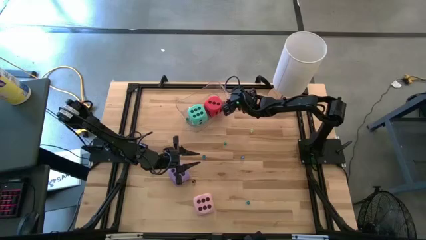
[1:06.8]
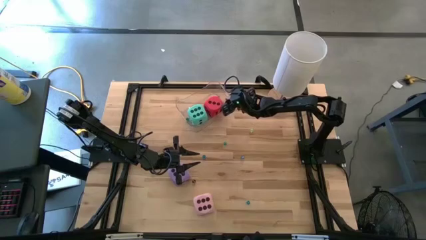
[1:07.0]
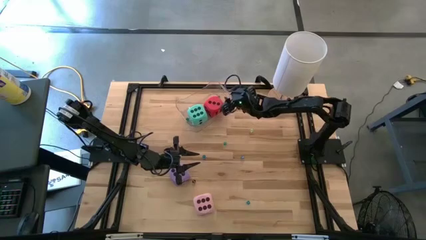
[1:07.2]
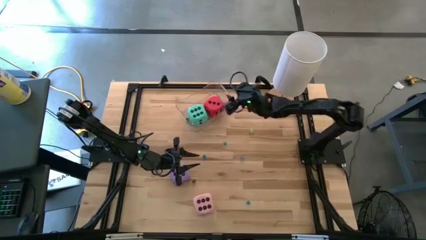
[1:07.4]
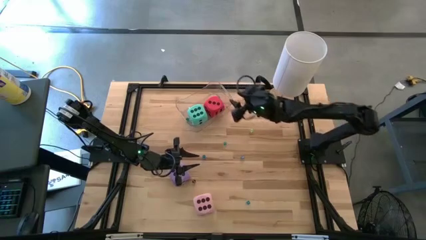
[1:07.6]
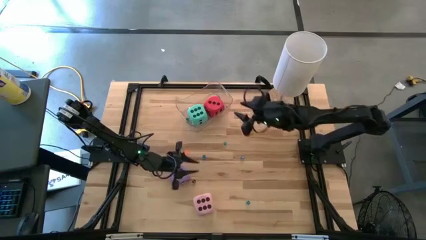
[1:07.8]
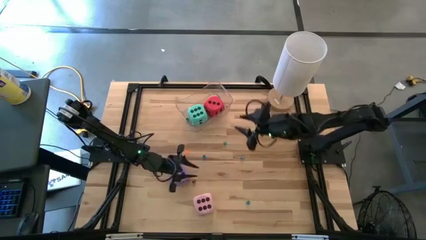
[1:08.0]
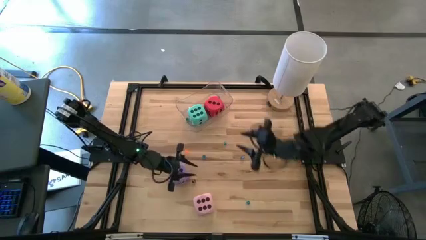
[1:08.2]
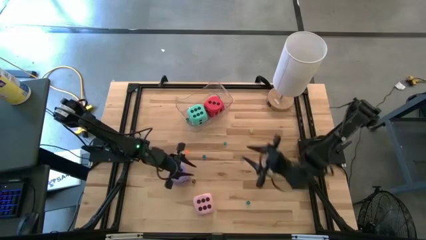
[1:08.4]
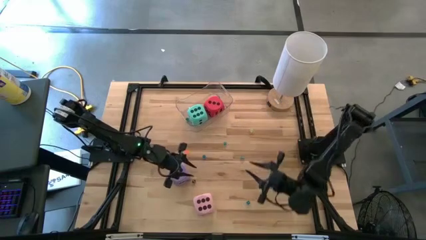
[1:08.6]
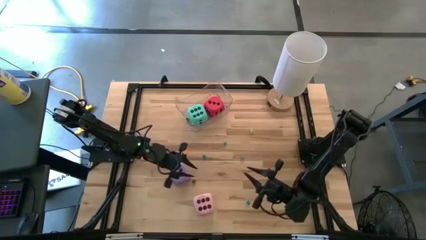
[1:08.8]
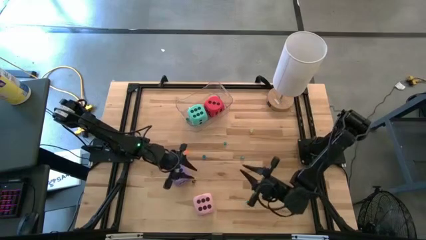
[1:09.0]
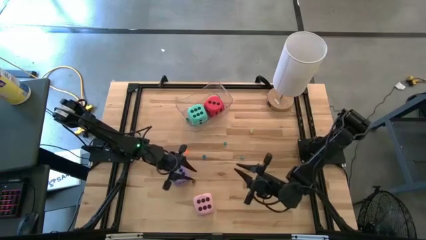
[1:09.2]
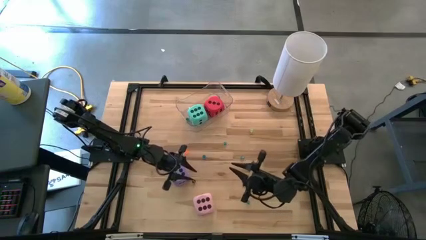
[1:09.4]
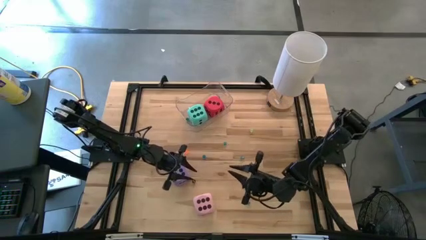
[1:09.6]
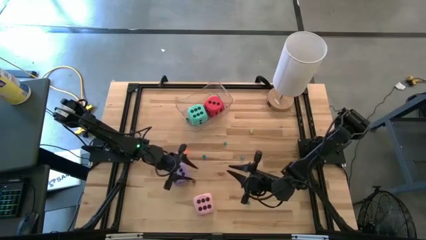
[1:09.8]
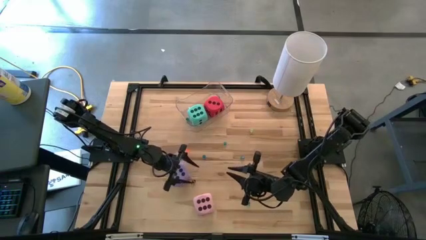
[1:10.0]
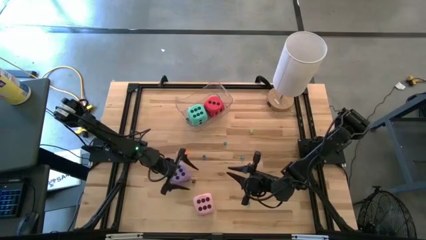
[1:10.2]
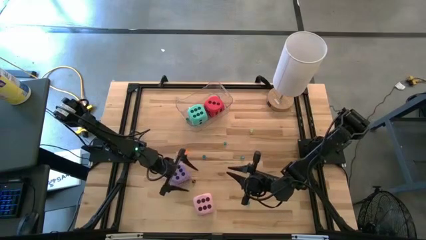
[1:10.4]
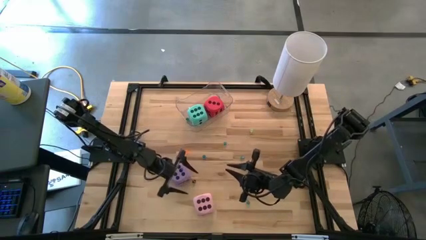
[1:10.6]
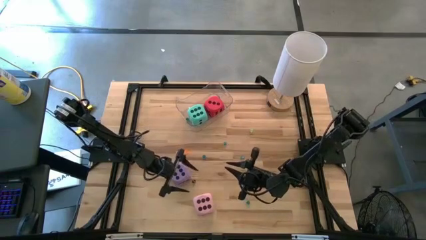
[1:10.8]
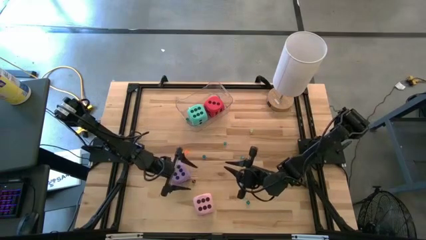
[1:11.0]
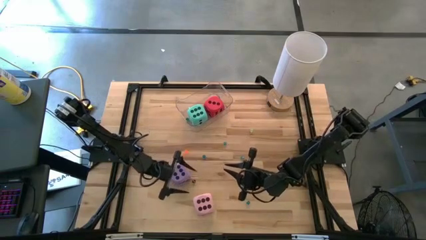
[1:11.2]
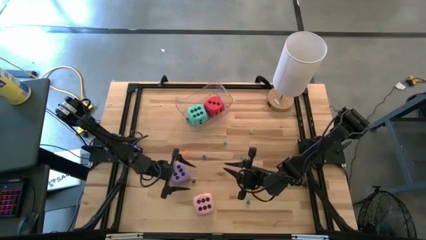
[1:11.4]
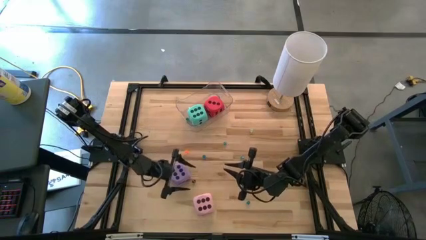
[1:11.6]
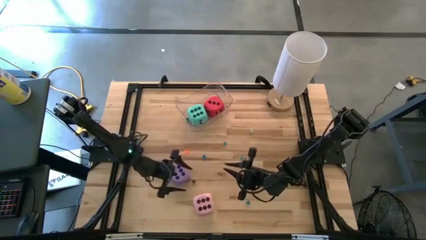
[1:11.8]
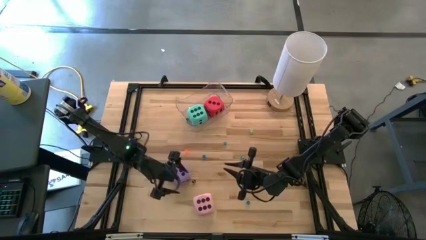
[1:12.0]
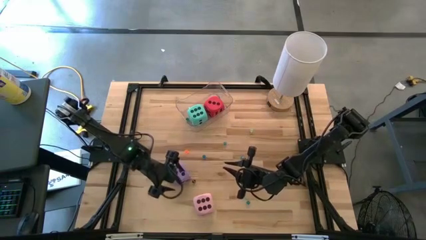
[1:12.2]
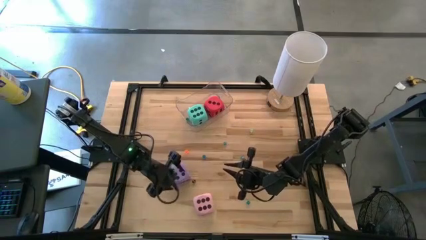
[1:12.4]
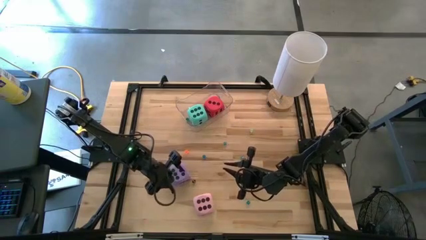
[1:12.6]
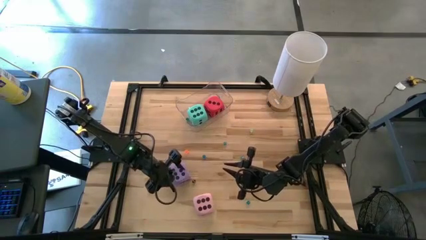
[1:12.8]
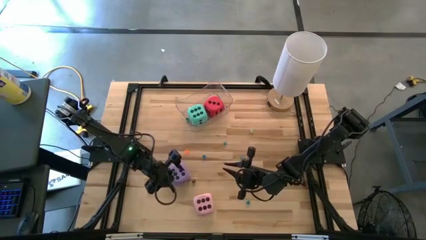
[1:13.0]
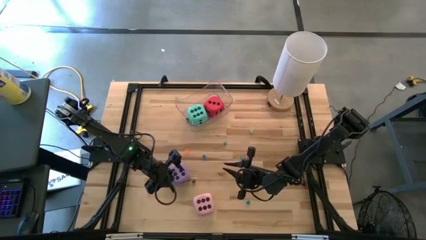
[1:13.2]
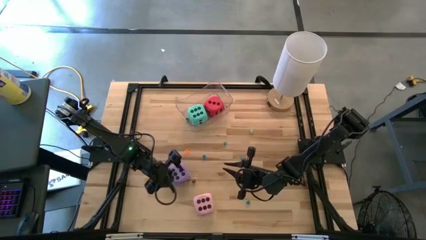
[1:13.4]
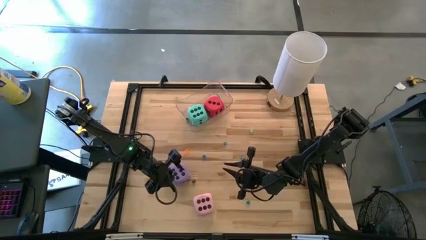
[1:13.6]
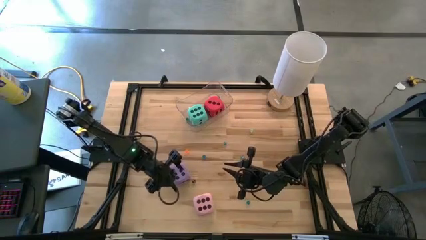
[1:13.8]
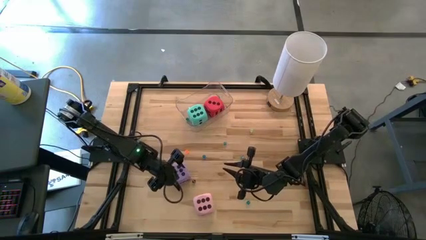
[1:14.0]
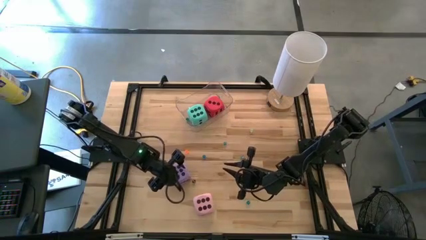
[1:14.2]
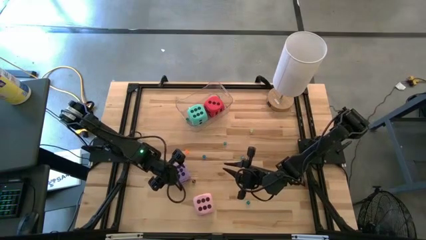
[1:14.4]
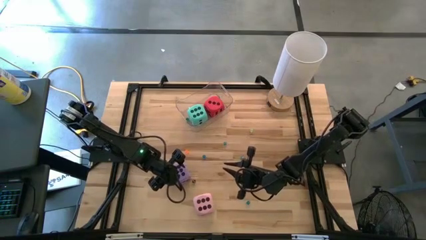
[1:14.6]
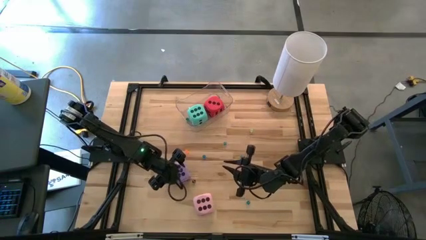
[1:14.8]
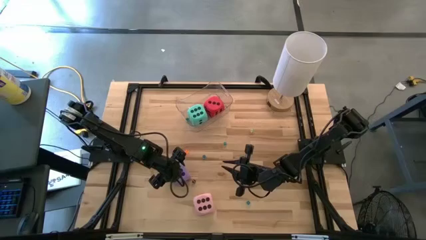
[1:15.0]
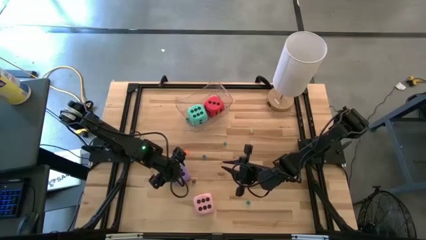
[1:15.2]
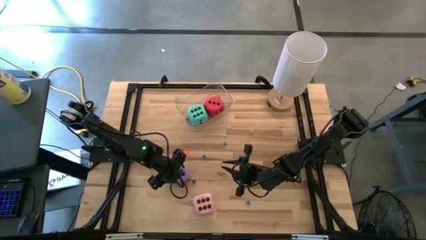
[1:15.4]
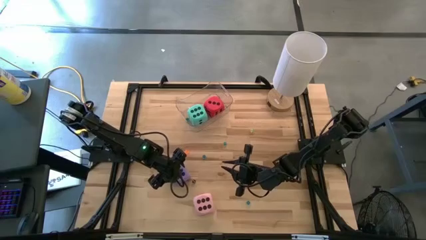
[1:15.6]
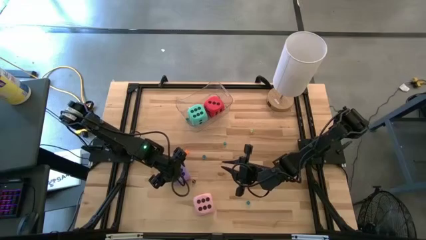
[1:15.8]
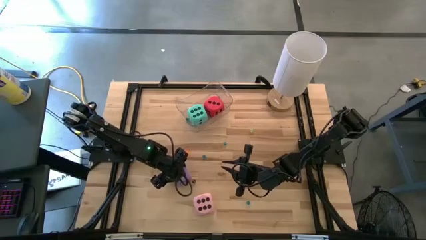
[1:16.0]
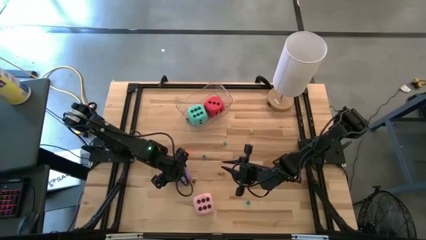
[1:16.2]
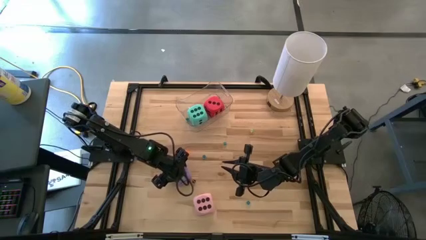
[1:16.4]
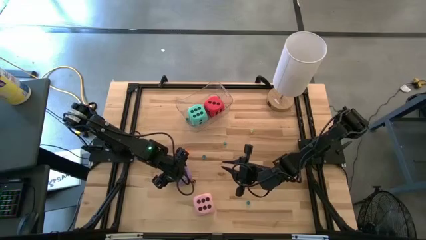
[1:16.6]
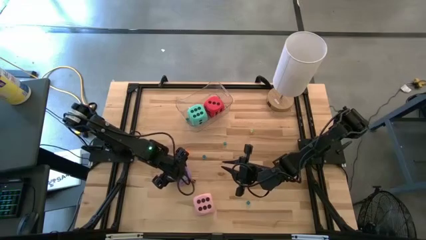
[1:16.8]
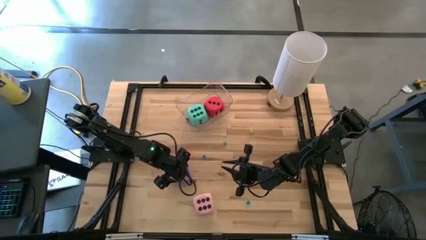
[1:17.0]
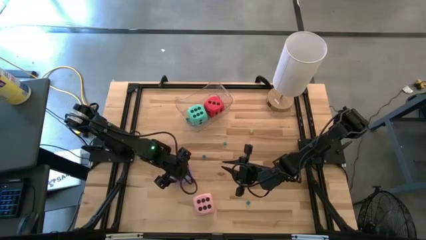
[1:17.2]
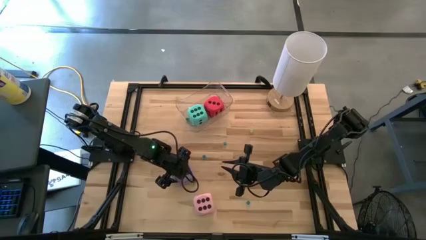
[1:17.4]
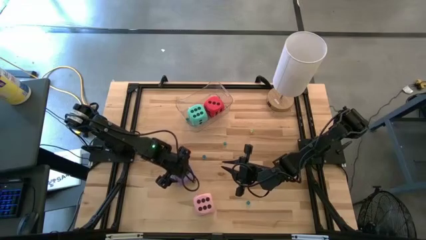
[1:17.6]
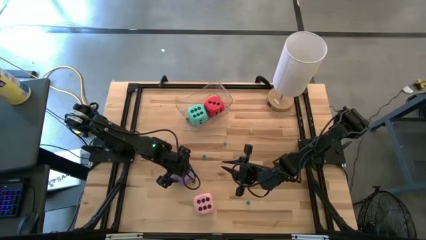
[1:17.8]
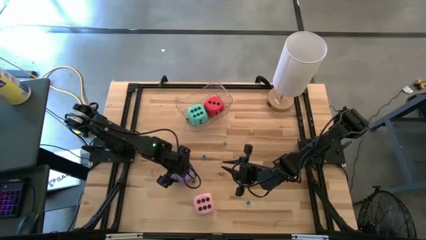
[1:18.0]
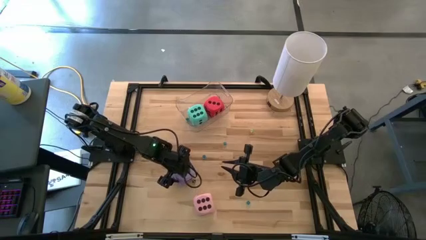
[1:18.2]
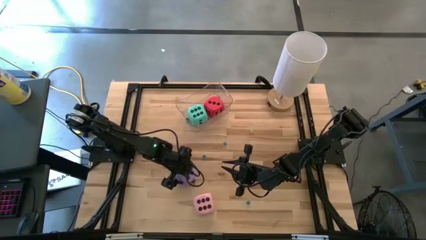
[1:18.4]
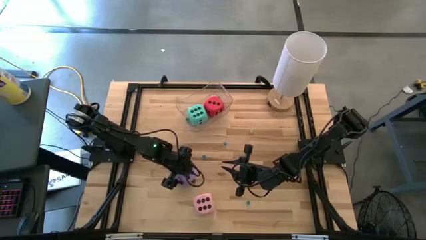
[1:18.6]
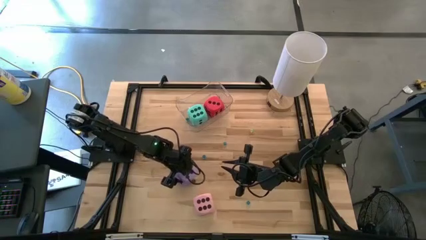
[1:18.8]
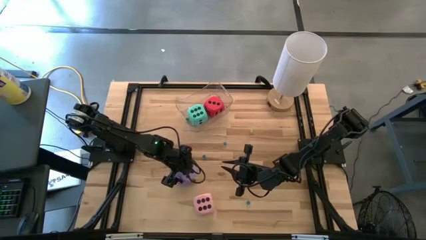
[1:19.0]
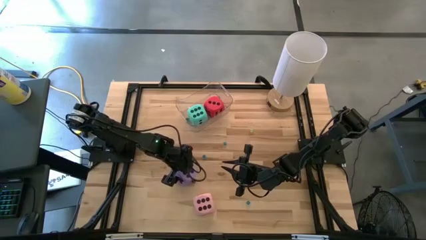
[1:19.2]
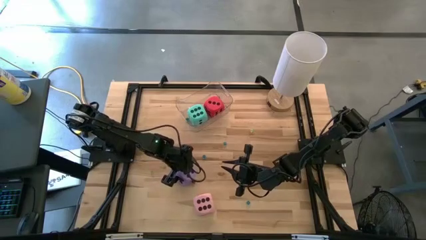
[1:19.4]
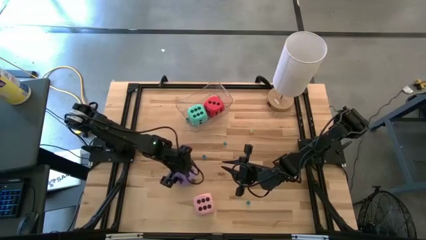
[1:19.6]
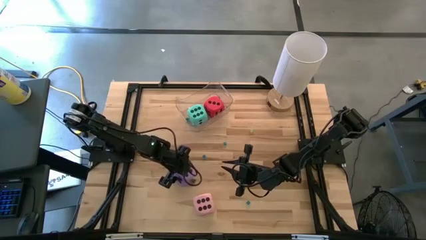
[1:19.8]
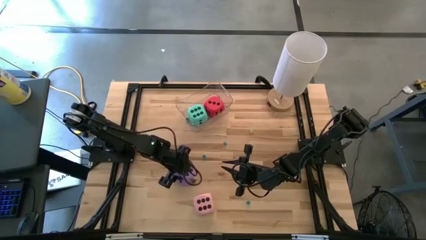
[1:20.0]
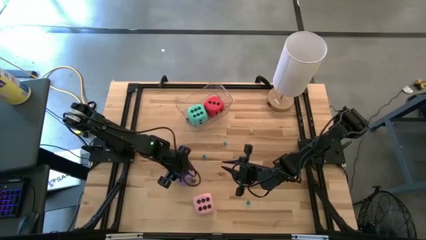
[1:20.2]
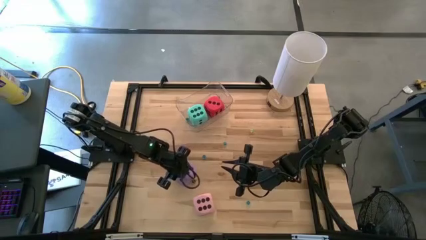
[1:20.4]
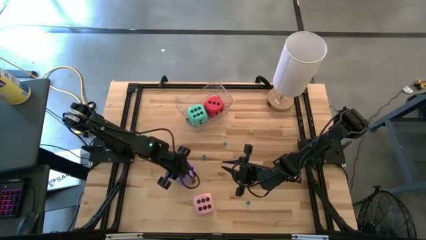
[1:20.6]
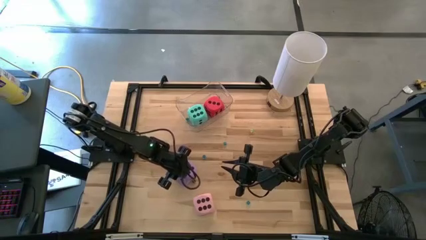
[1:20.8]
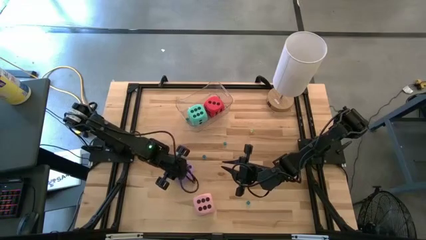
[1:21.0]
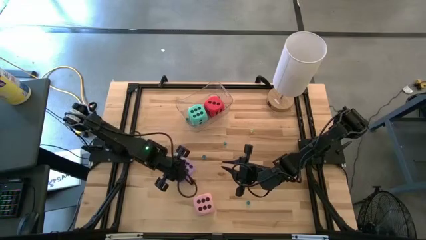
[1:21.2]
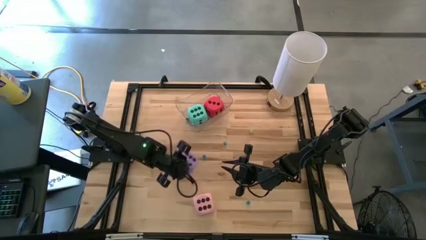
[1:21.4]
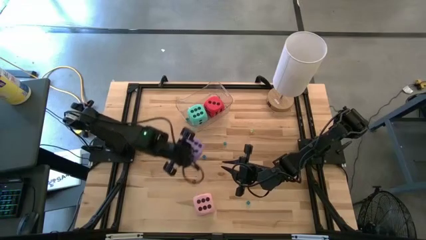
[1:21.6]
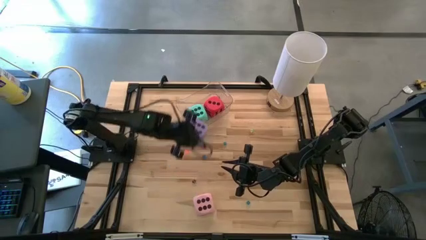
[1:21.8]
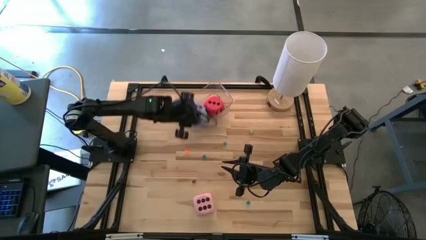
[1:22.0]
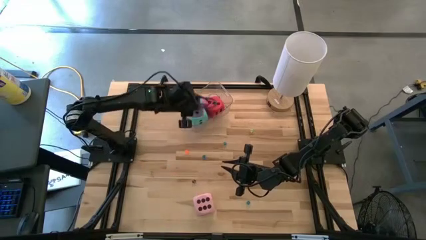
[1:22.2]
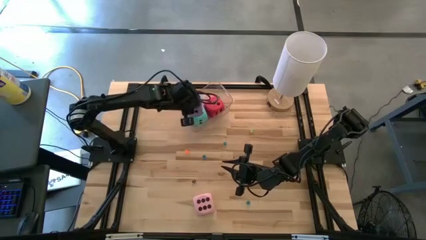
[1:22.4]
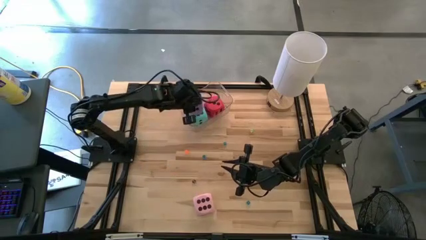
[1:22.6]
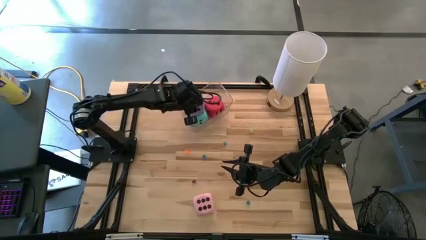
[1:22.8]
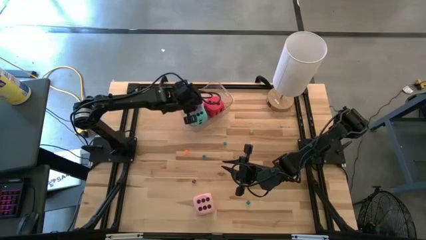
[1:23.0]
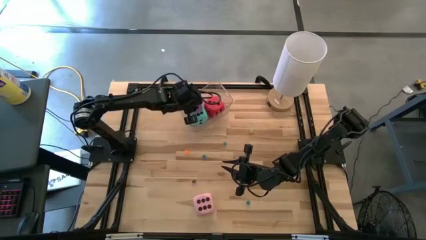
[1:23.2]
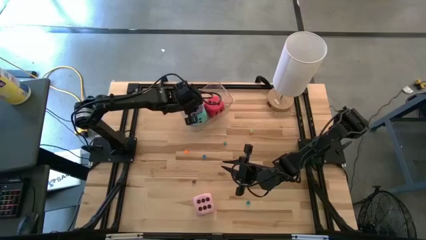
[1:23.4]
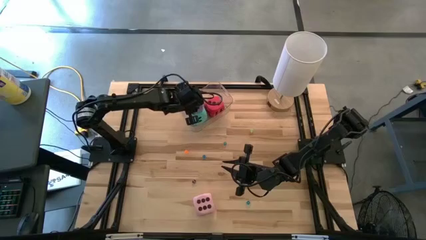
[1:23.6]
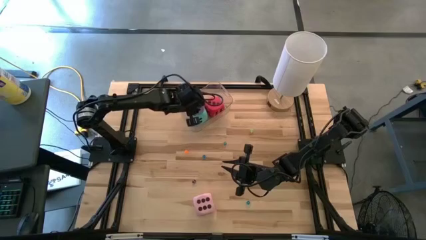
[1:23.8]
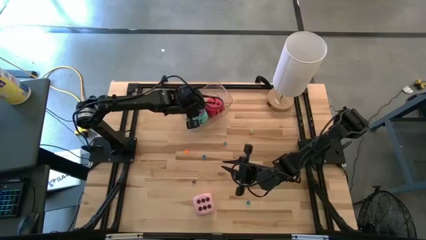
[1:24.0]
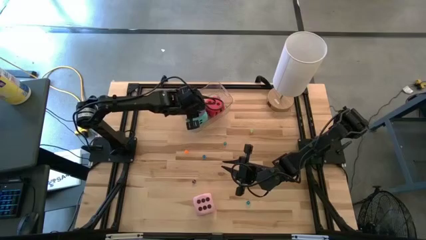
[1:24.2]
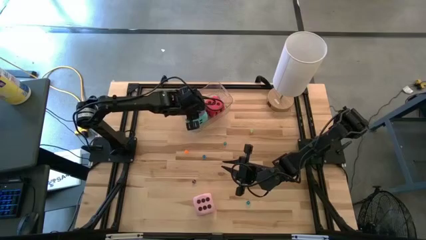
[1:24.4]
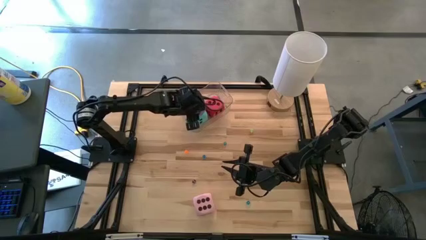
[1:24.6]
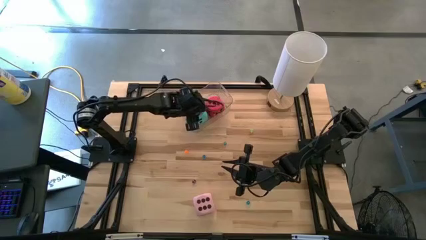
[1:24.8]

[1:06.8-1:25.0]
Task: Pick & Place Dice
Put the top large purple dice in the transparent bin
